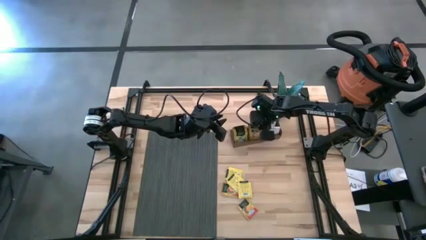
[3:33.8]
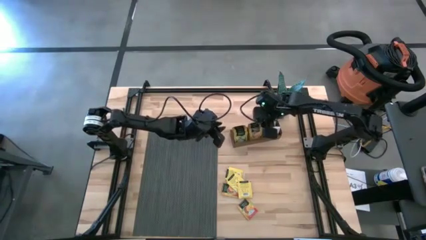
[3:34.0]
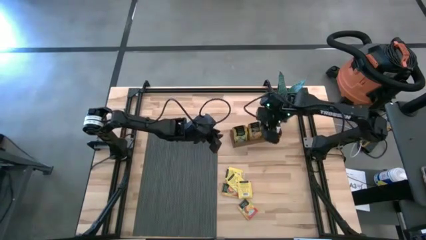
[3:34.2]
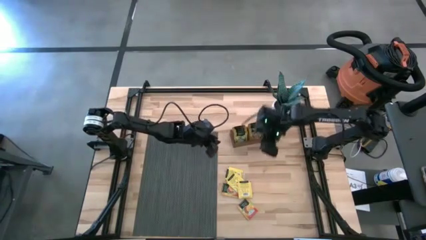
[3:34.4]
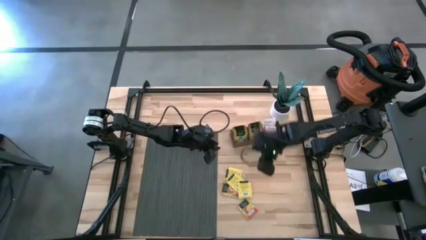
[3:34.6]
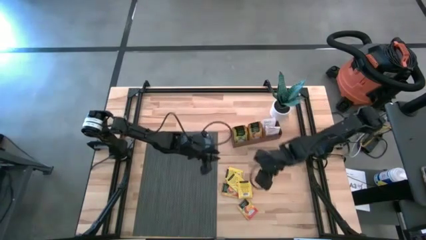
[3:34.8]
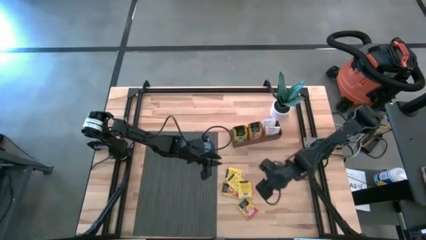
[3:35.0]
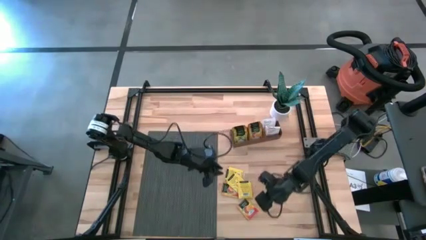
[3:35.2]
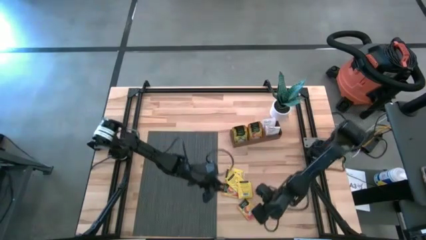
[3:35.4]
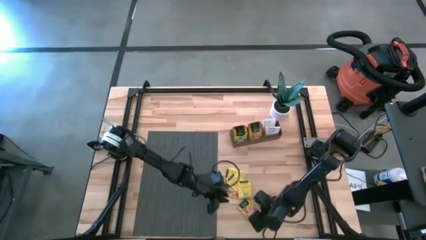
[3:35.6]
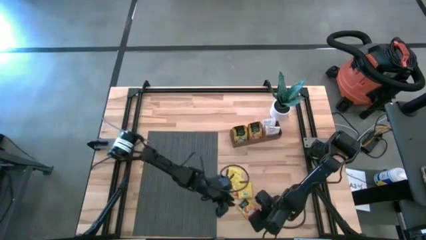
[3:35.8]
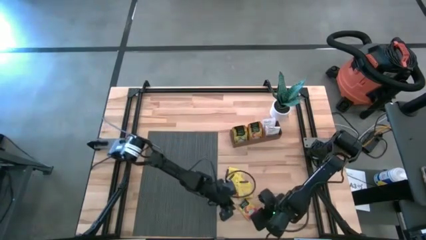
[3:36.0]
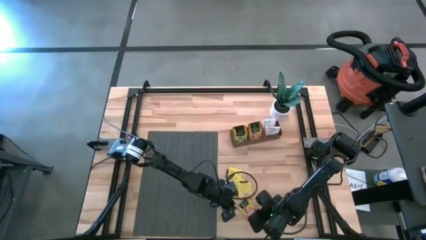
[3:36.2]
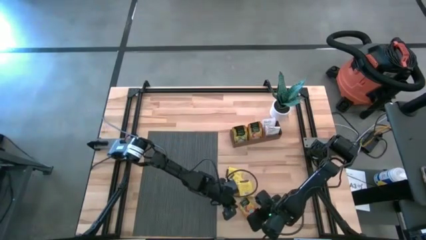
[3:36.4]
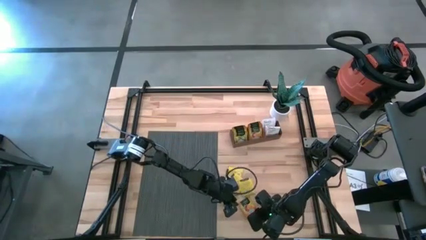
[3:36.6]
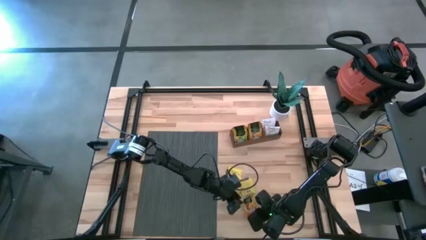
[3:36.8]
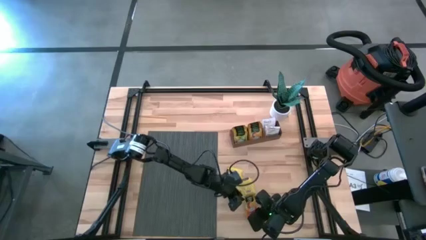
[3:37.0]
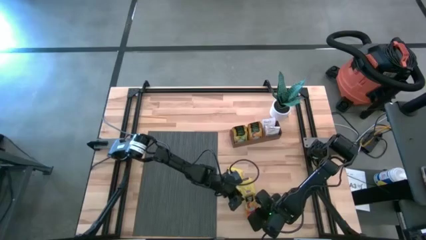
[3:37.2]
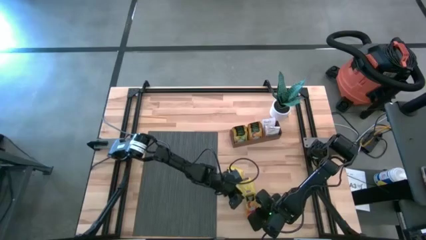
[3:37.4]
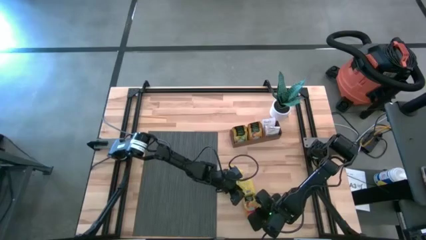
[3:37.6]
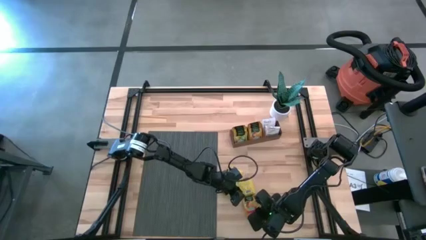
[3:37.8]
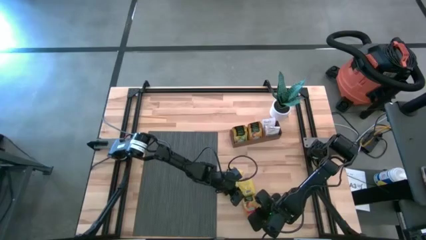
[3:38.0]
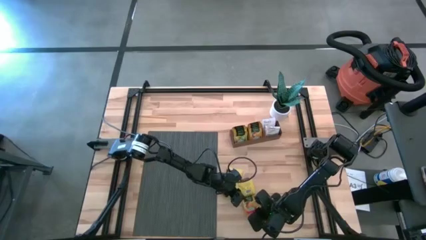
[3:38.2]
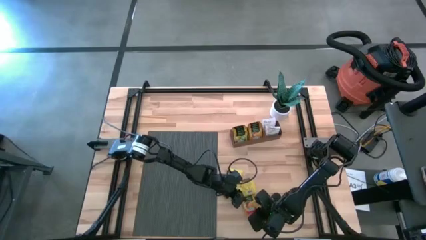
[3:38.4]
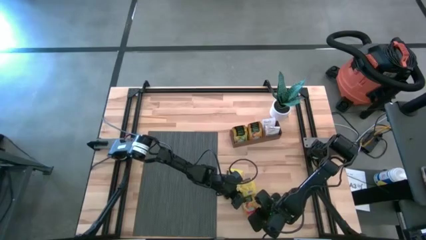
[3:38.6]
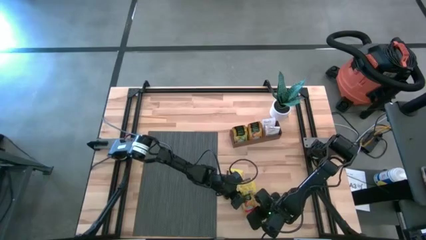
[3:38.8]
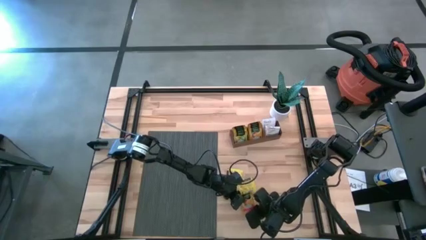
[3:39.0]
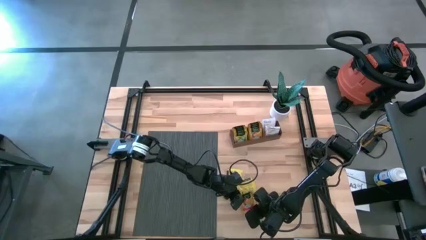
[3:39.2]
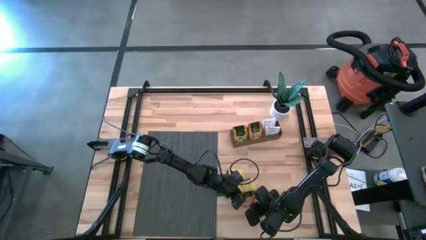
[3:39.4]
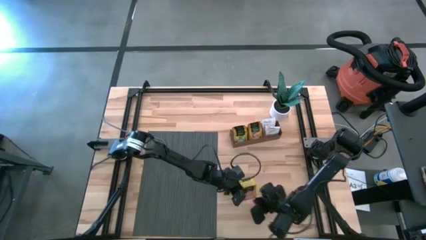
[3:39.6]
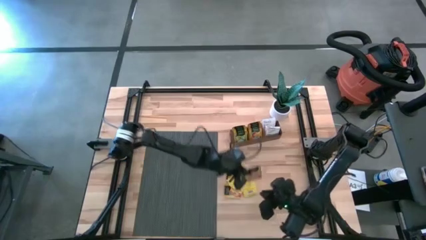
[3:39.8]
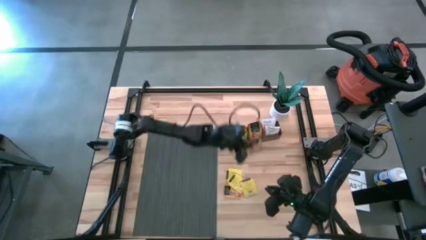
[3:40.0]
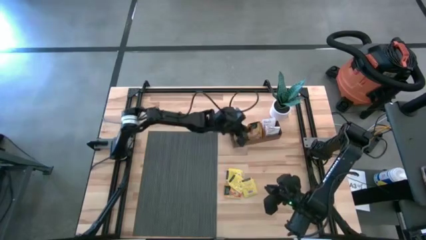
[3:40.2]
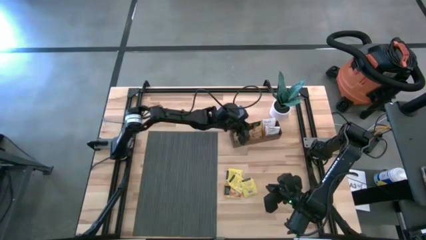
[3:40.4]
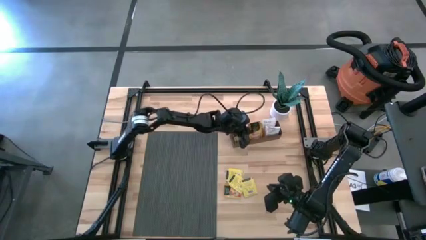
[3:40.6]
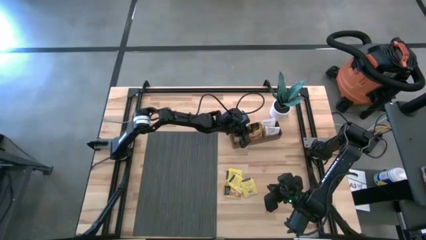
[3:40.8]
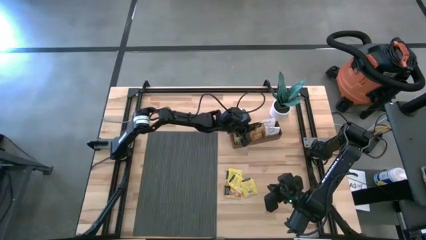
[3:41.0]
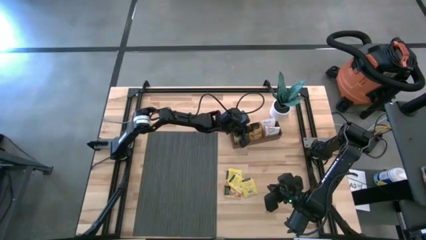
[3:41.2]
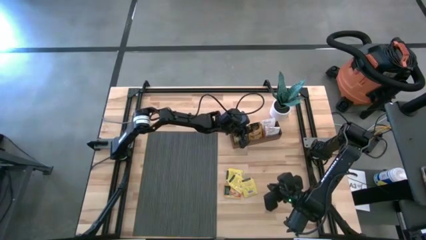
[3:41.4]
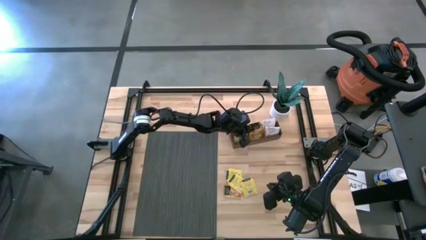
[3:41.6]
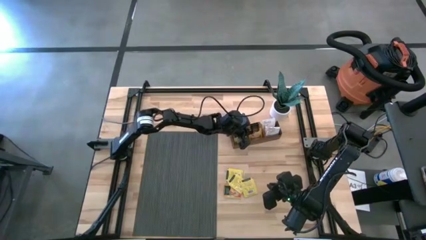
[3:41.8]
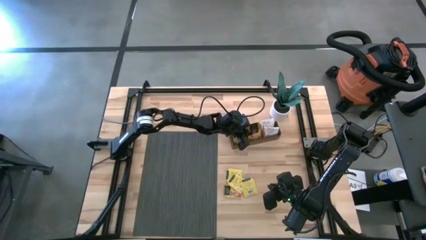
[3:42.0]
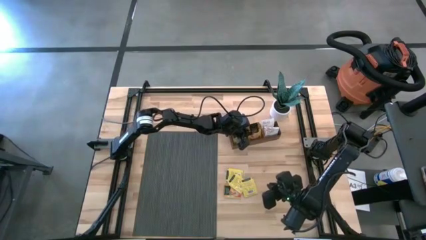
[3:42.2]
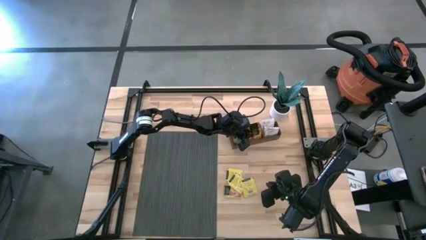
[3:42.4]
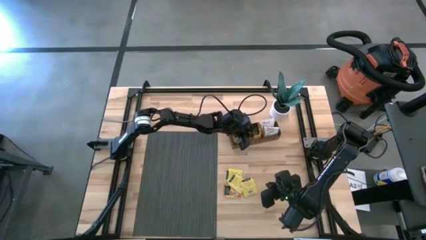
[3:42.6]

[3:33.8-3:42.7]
Task: Pick & Place Tea
Put the orange tea bag into the left section of the wooden organizer

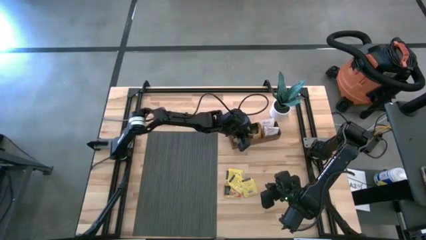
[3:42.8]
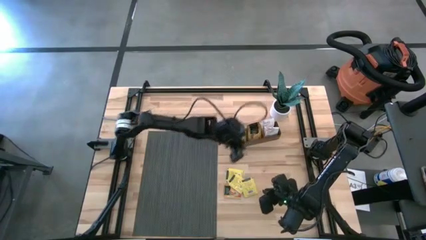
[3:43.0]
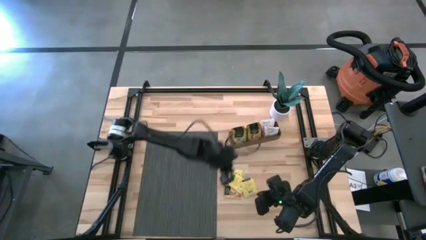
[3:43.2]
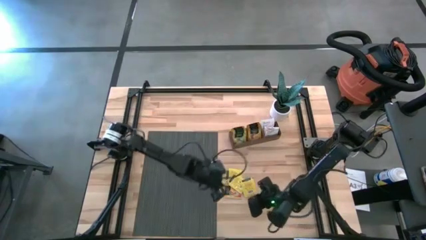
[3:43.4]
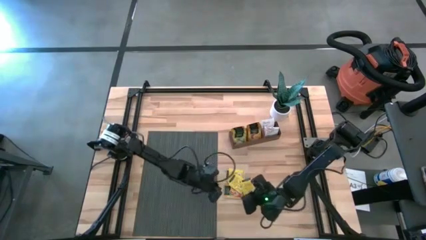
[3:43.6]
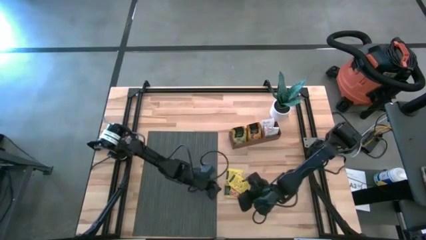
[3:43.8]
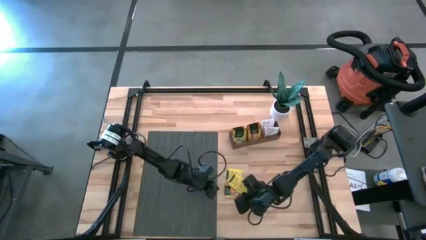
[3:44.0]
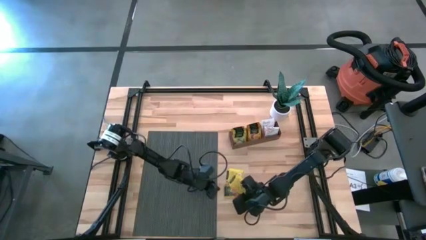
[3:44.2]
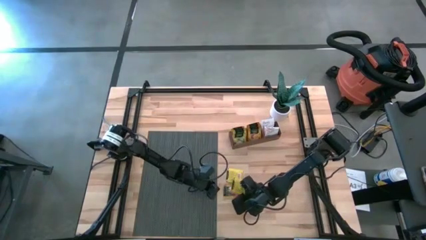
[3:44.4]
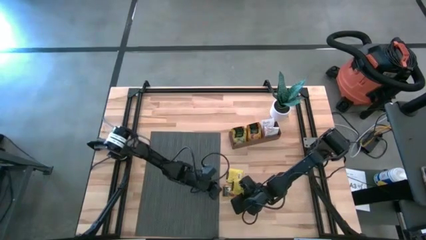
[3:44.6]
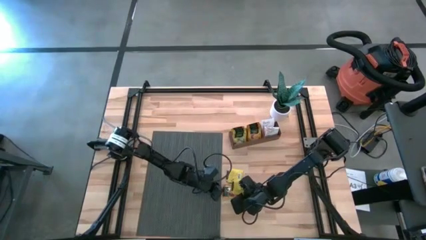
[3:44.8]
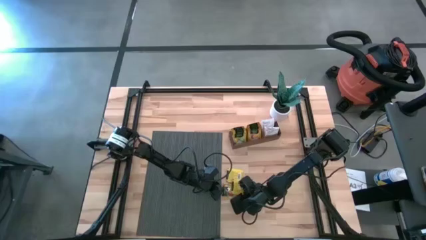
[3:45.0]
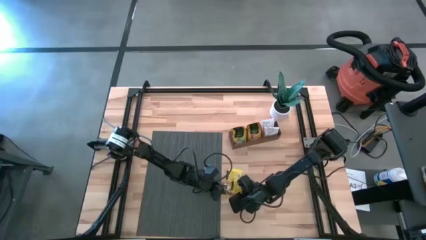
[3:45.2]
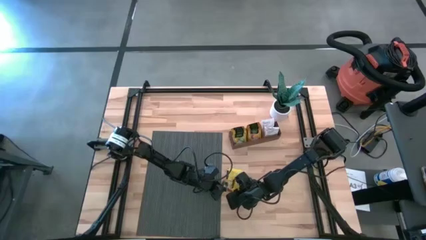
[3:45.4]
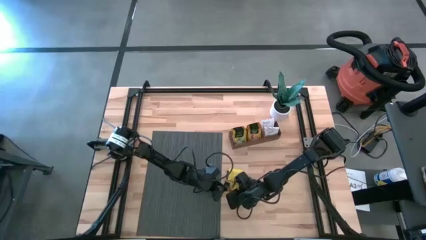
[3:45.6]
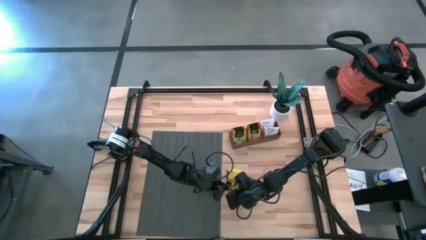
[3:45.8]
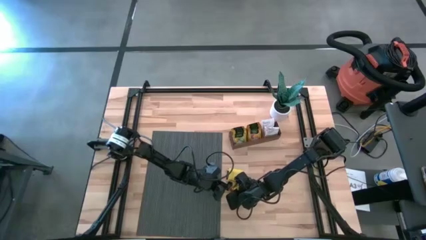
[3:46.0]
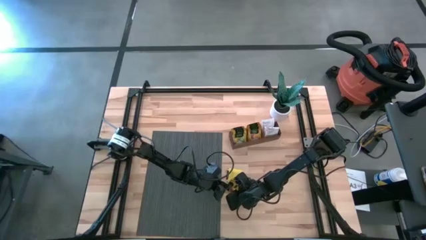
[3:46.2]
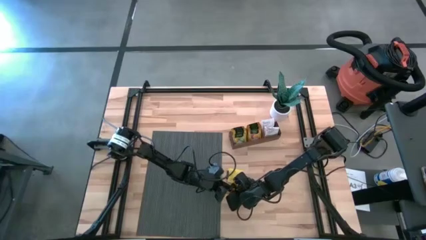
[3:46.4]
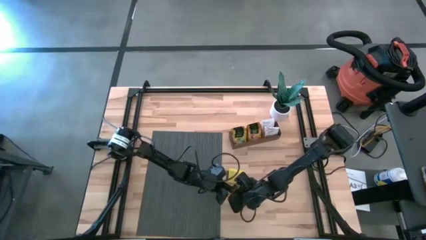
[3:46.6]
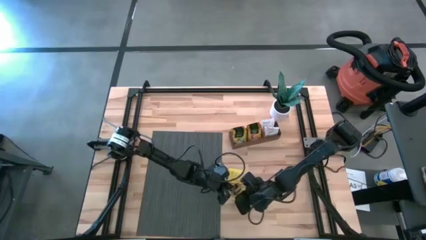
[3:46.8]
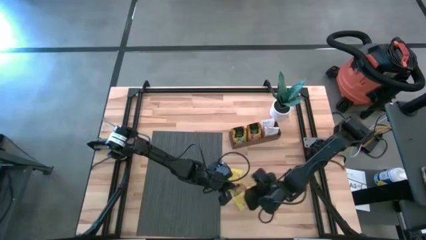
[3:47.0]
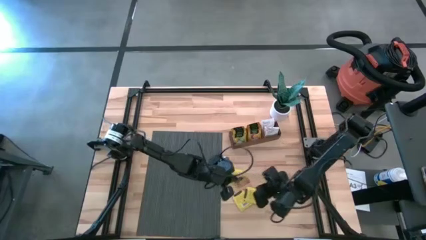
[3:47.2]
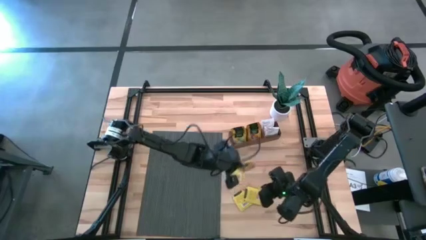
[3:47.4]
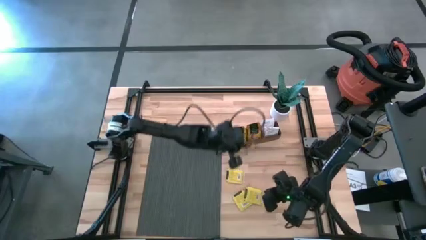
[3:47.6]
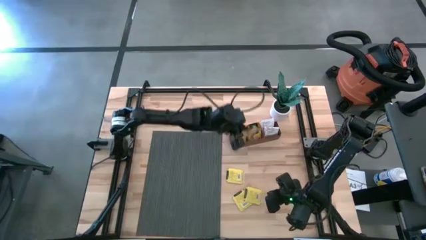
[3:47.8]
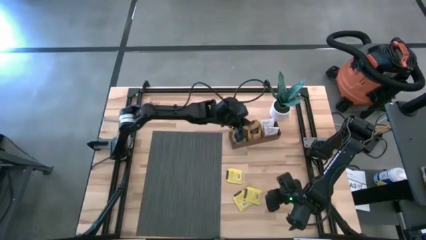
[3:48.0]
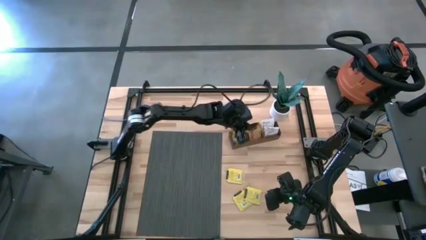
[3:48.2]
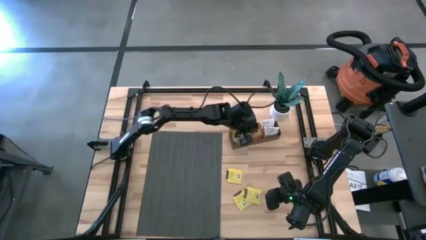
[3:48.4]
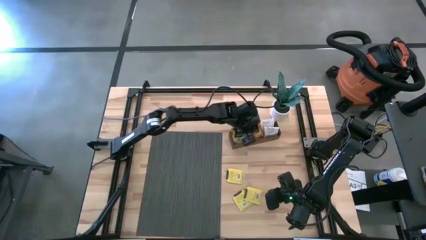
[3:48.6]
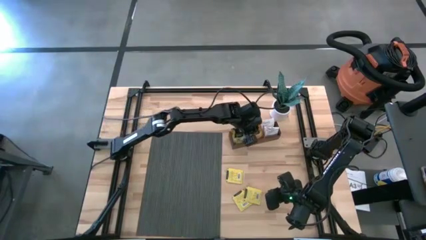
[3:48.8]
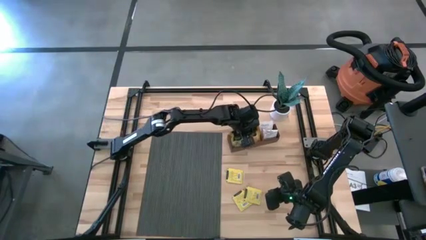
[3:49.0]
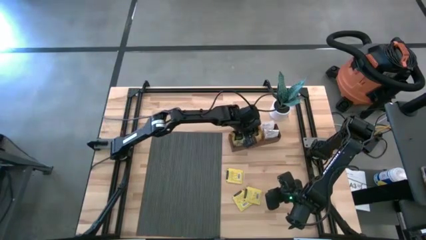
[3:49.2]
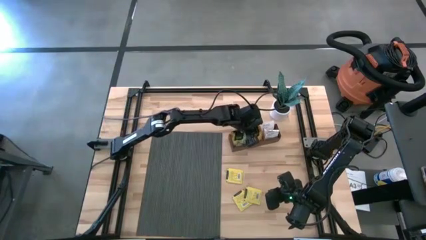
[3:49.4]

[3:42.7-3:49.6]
Put the orange tea bag into the left section of the wooden organizer

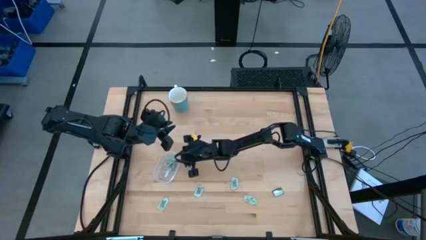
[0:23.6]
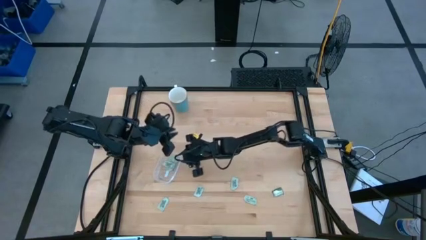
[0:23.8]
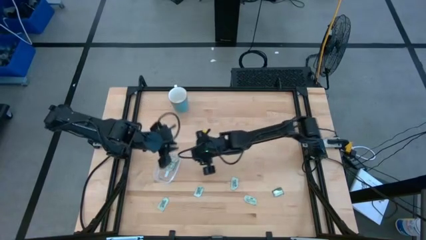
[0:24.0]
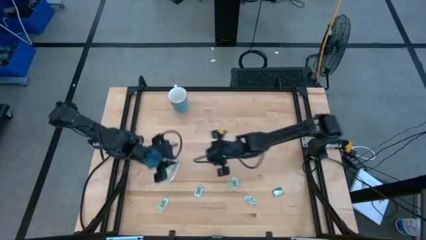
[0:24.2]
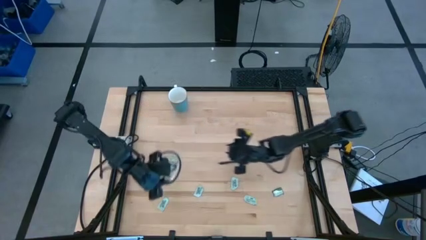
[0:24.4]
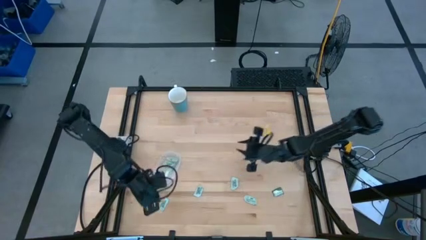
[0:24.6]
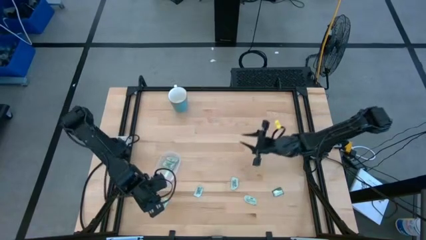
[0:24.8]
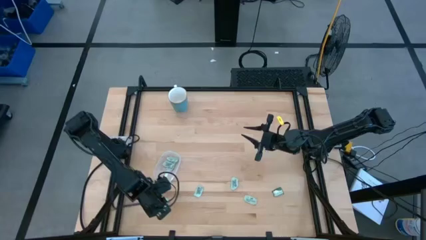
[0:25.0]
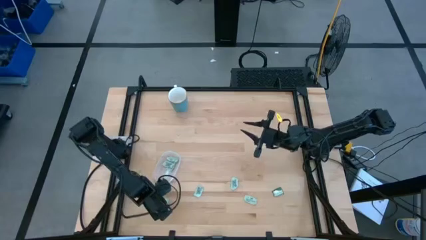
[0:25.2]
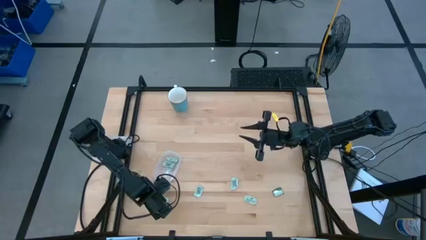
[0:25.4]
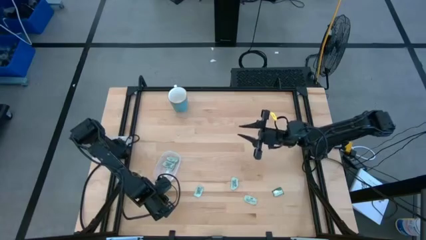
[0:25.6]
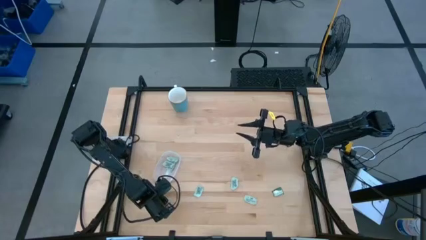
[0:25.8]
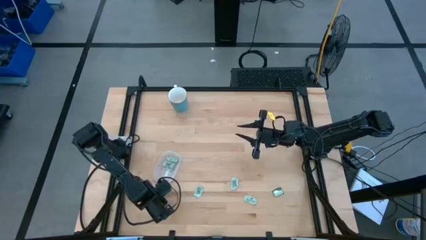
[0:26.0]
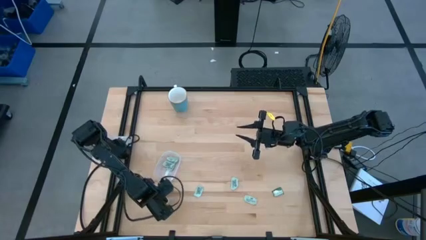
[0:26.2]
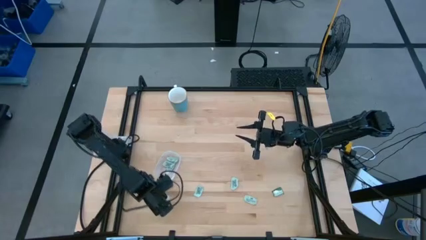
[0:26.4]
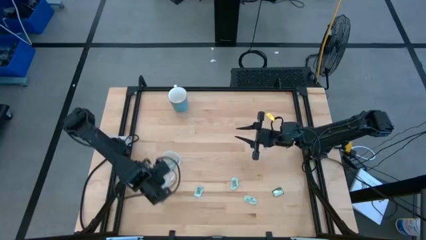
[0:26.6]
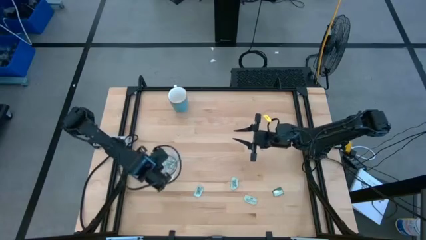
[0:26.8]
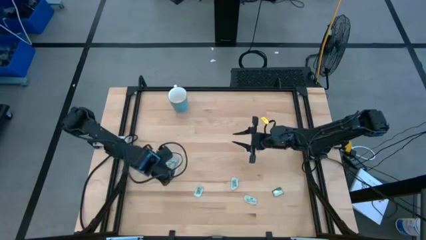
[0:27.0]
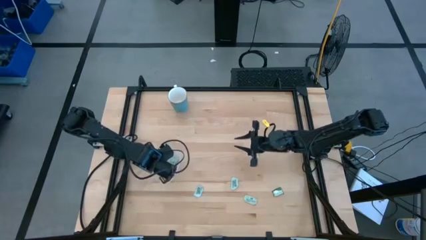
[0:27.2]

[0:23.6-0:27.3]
Task: Pick and place Stevia / Truvia into bins
Put the stevia packet into the transparent container
